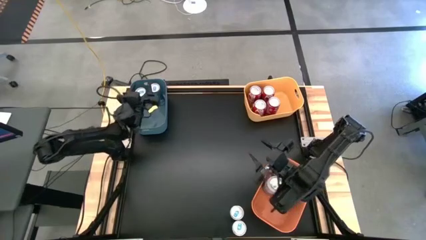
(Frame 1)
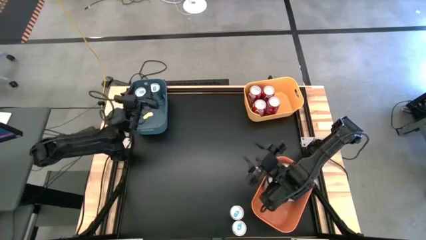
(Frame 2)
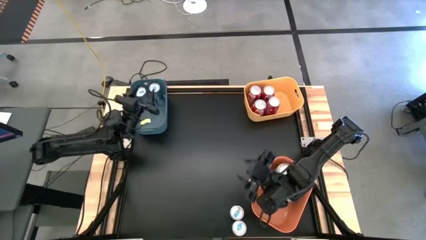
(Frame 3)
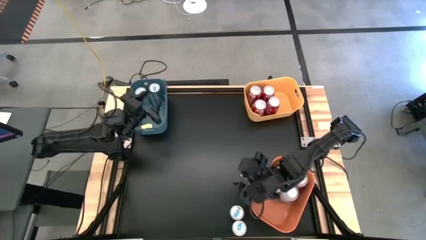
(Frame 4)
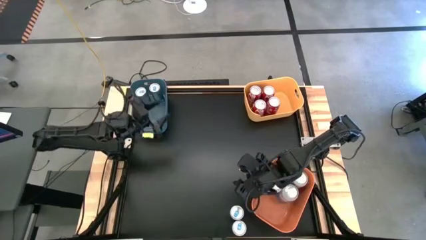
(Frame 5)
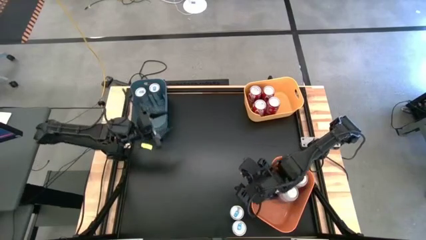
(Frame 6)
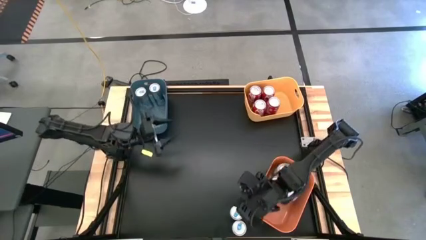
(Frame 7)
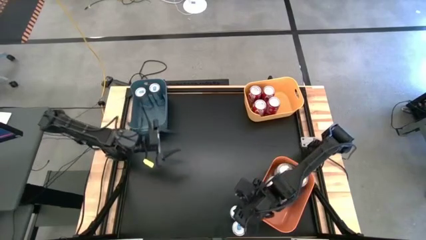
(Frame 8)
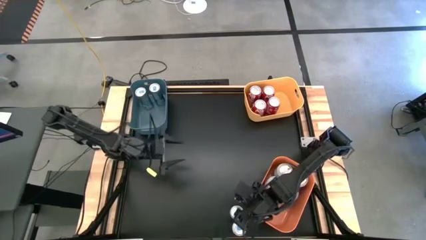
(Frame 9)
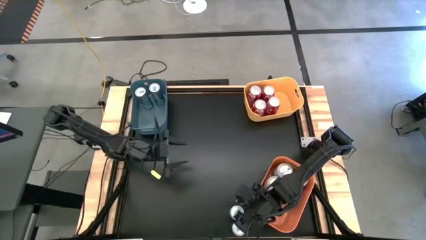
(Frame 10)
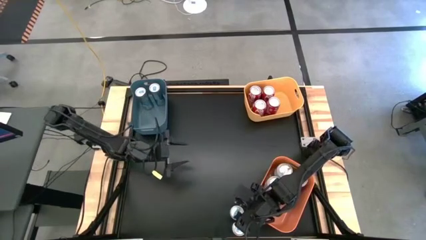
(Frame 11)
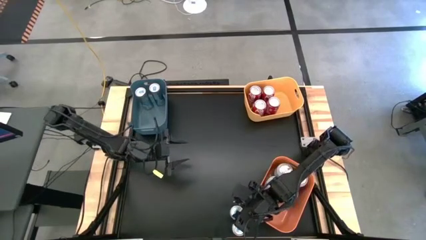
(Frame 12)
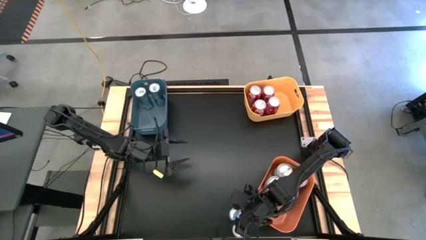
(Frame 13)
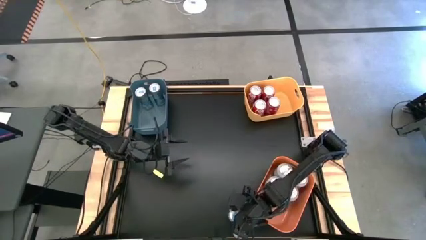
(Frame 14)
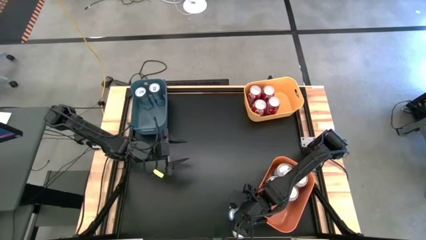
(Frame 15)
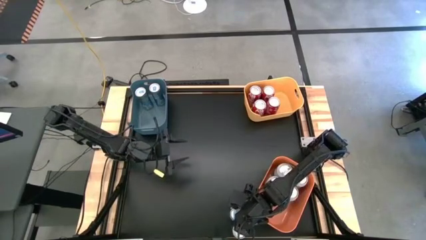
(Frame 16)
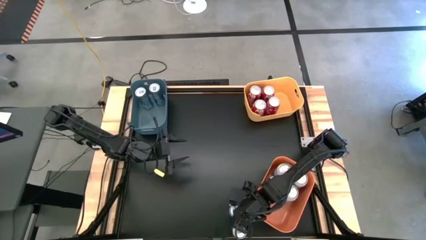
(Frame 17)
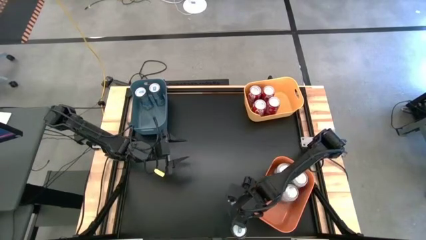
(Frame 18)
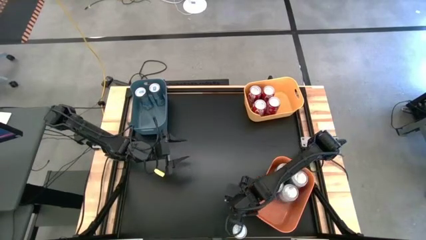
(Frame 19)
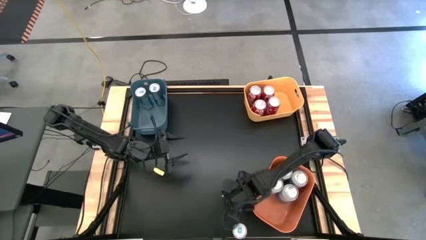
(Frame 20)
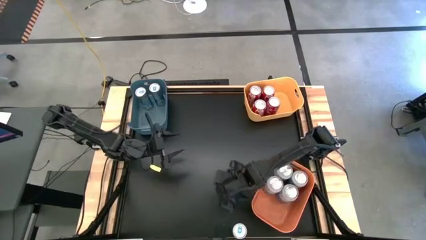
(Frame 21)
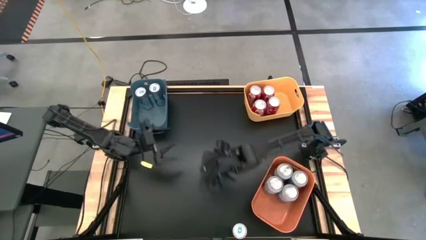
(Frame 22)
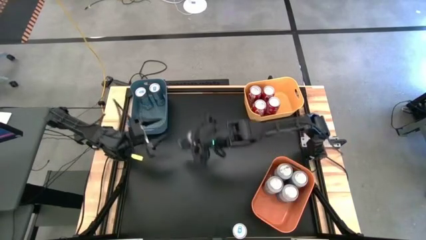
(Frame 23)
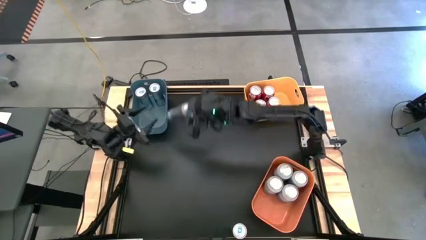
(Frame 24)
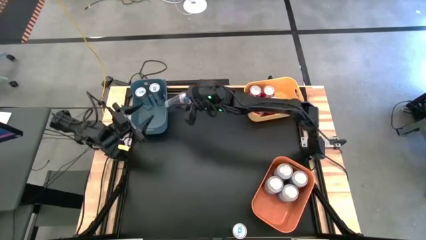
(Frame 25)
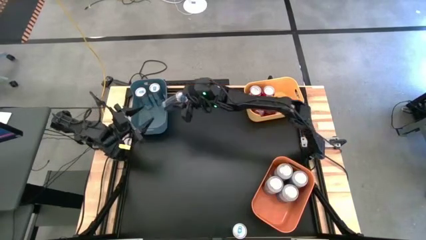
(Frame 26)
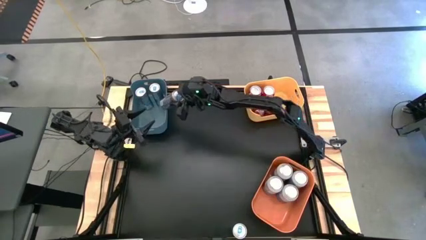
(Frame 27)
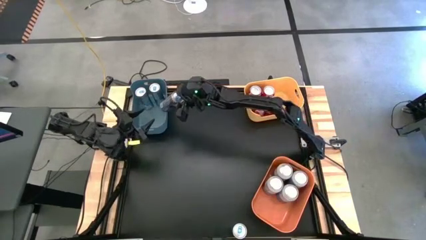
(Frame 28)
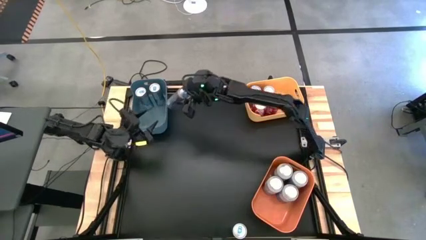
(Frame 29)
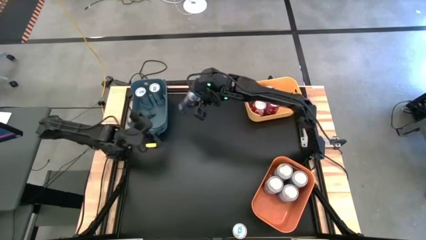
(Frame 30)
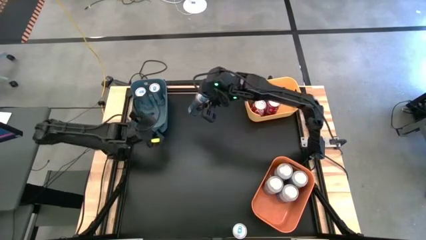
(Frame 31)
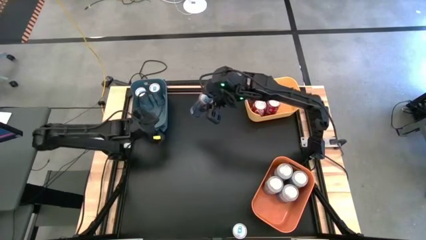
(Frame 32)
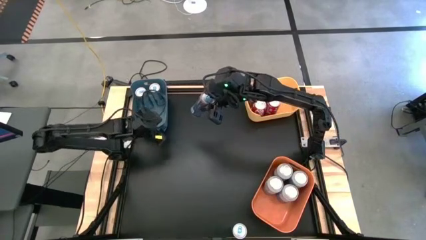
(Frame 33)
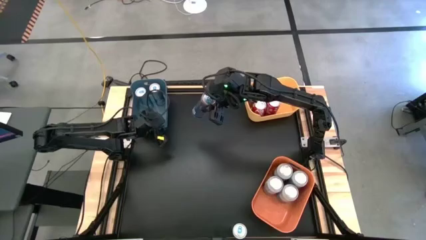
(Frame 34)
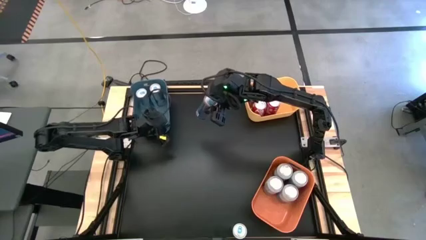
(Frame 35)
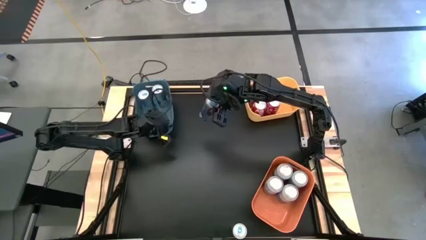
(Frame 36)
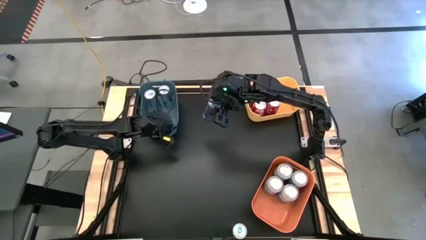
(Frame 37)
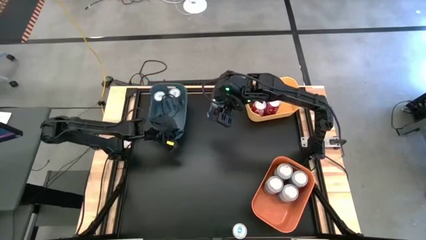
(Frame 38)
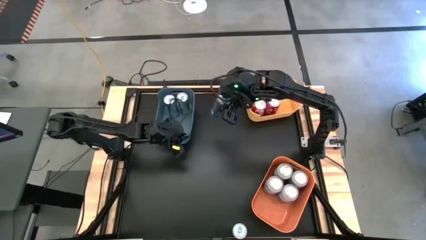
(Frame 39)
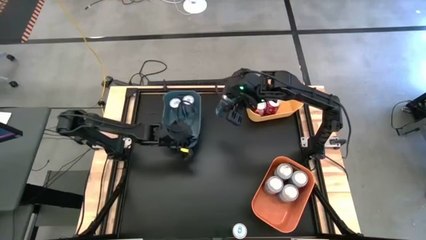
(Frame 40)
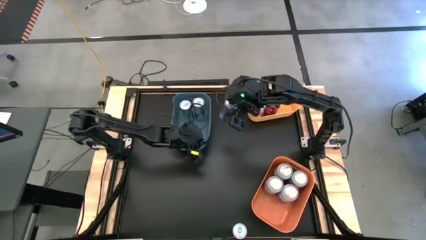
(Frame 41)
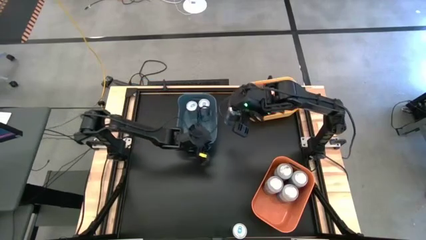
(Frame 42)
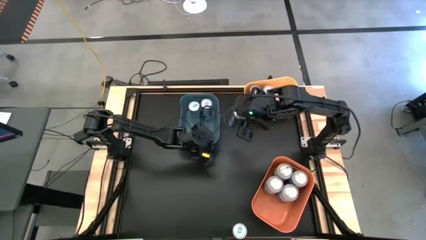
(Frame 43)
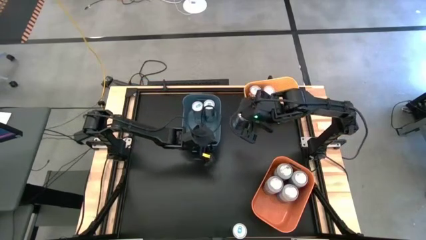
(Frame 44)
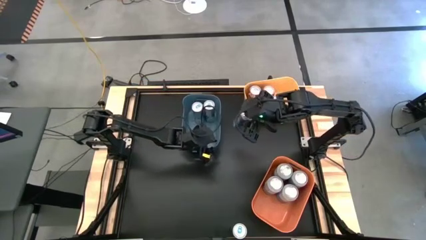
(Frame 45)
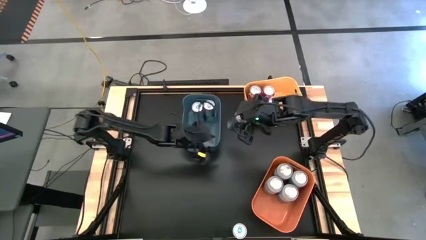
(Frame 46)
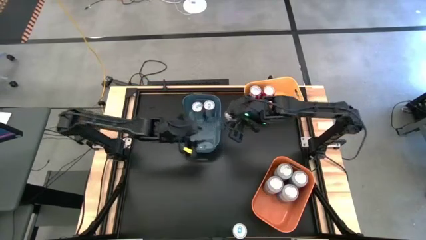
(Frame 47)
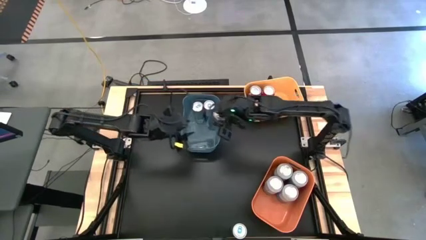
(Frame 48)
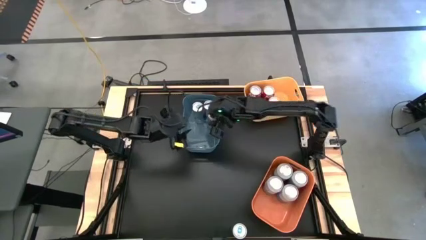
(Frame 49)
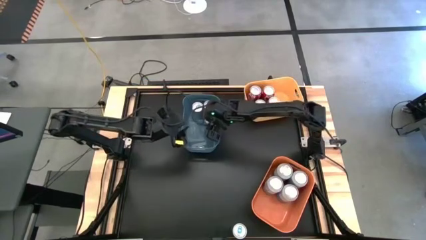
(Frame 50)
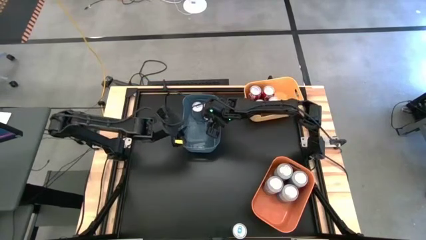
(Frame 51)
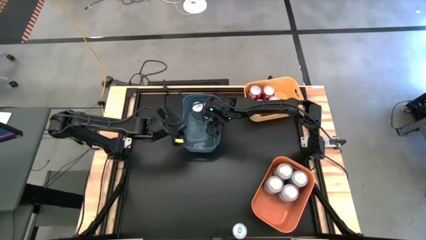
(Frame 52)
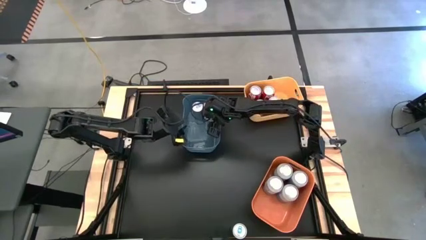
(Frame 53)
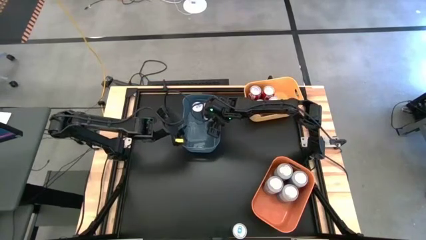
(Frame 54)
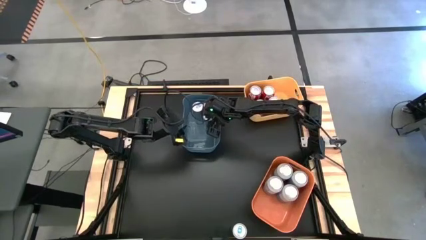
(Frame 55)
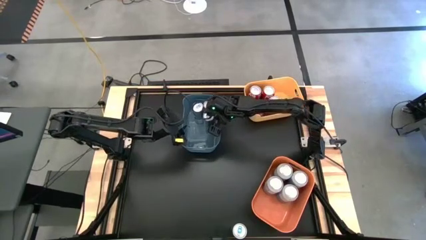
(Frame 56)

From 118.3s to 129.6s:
Task: Sort soda cans
Put the top blue soda can into the blue bin

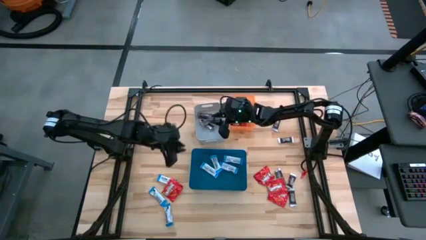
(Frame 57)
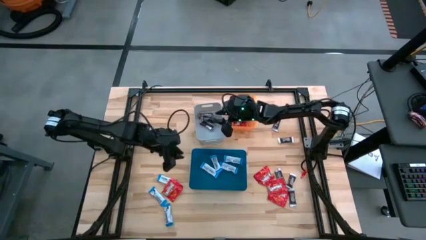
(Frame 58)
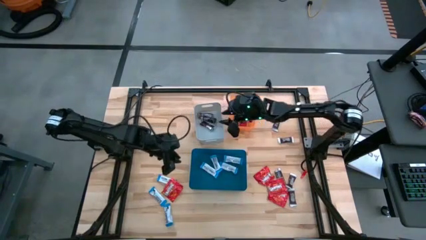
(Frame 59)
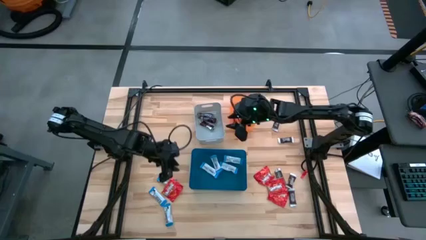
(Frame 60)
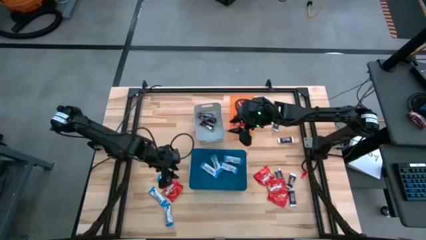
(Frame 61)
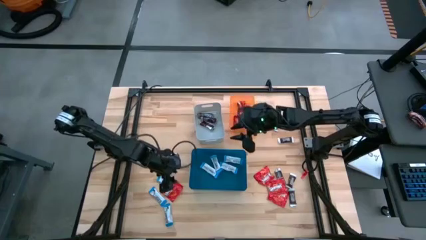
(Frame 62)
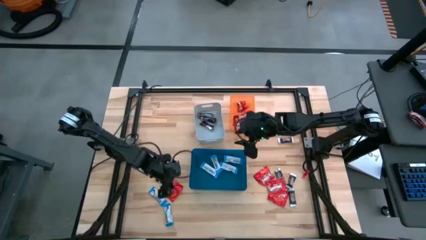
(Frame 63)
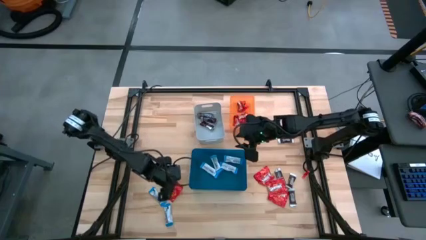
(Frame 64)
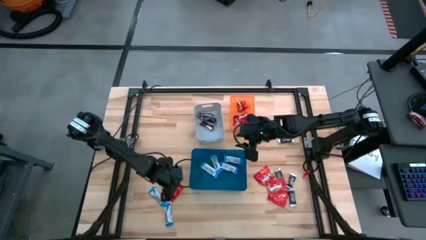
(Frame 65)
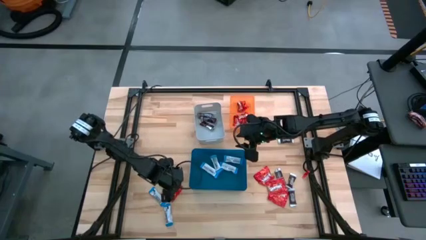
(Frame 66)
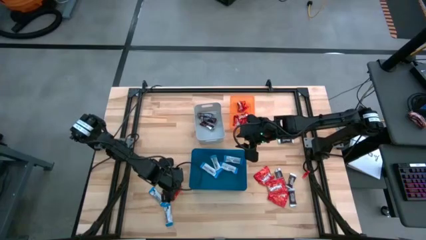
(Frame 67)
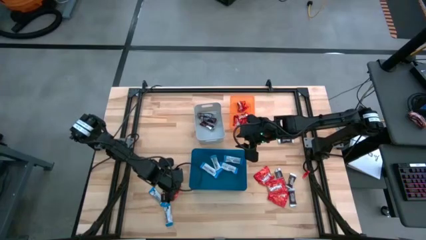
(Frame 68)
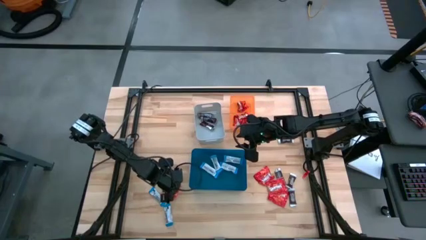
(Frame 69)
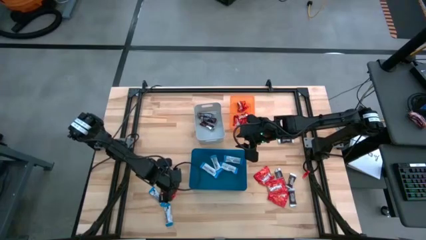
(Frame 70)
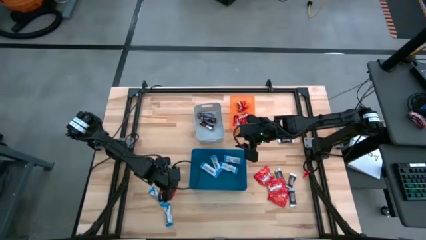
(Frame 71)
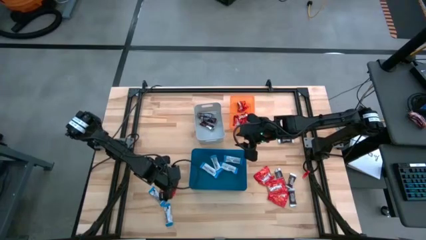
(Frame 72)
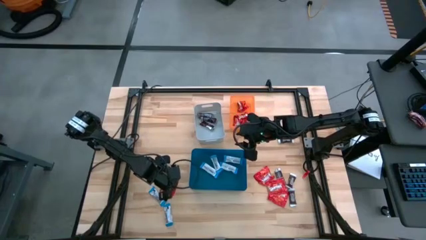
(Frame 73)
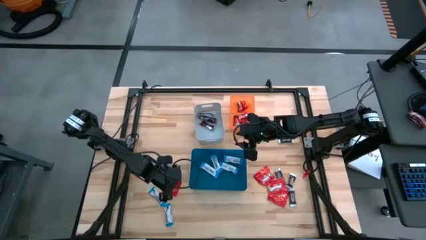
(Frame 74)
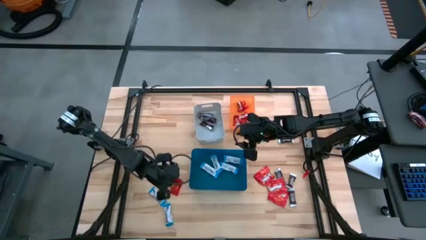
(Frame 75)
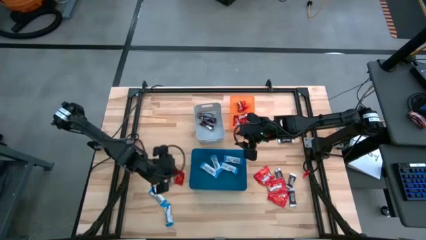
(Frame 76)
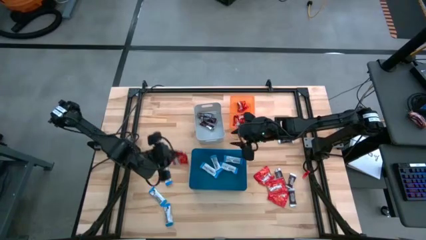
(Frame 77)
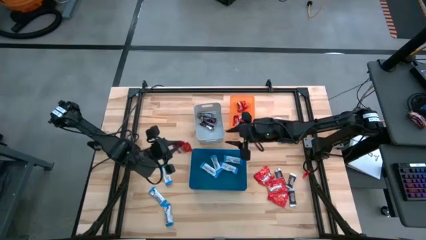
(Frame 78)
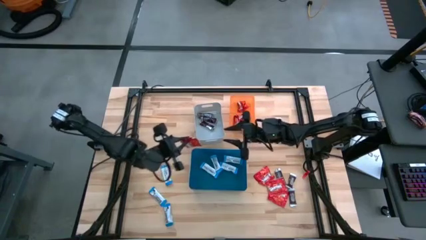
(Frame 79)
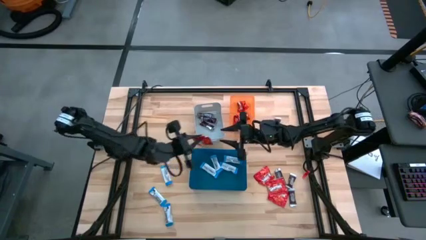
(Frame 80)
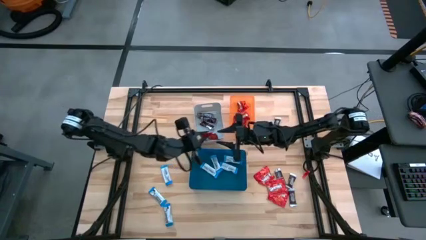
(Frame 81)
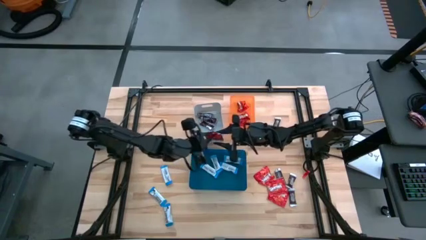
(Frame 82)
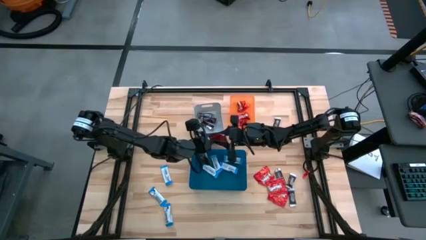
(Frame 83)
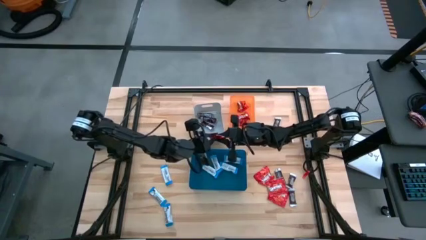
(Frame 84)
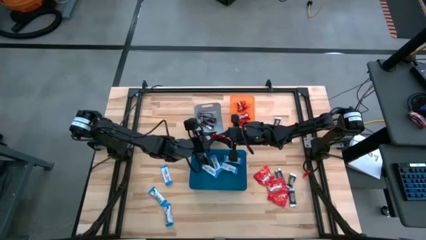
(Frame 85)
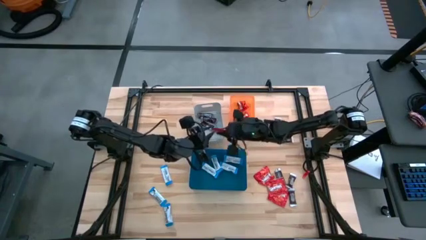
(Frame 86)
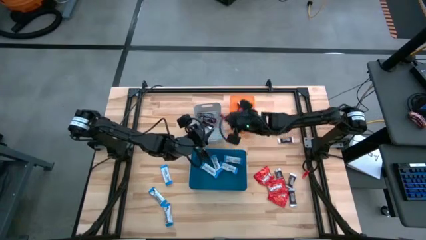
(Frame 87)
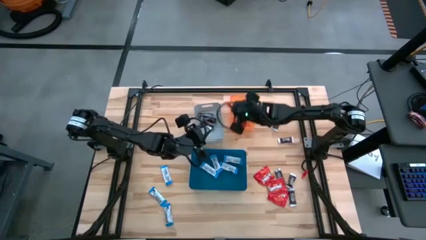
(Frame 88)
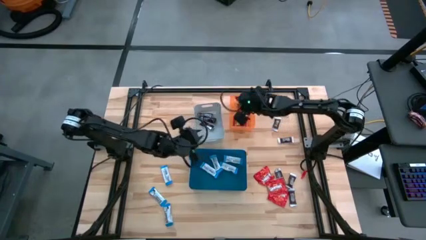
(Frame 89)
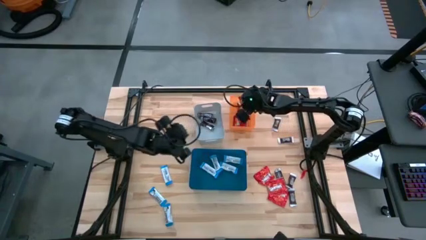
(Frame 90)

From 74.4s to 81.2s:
Task: Sort candy
Put the red chocolate into the orange bin
